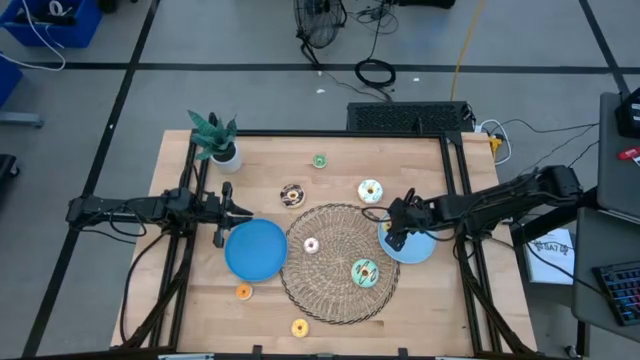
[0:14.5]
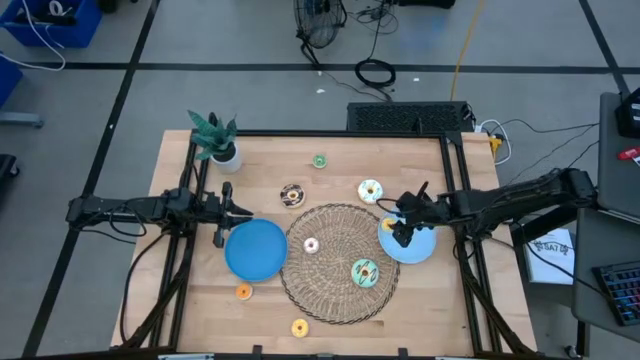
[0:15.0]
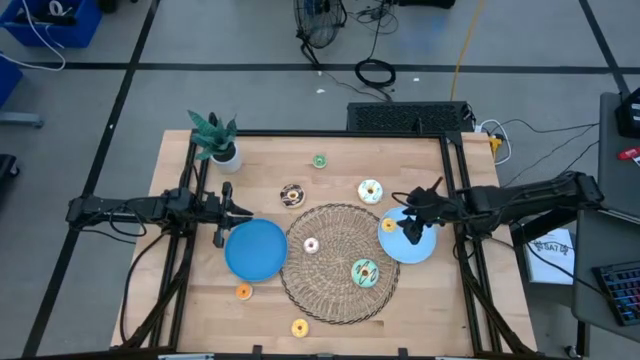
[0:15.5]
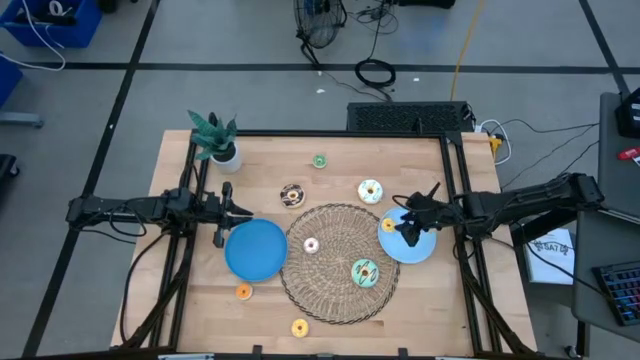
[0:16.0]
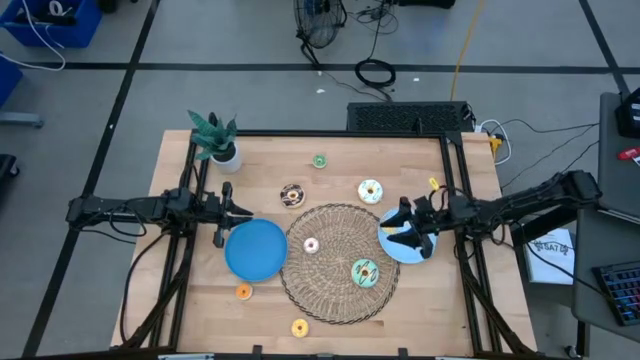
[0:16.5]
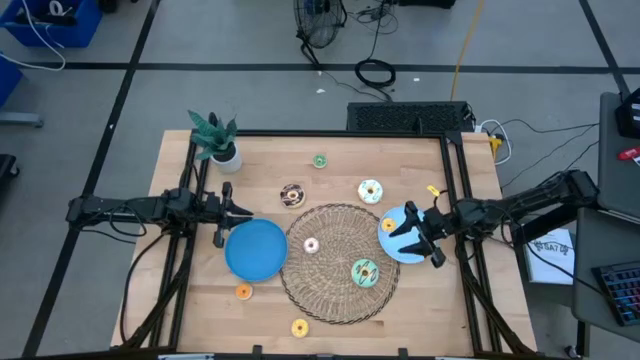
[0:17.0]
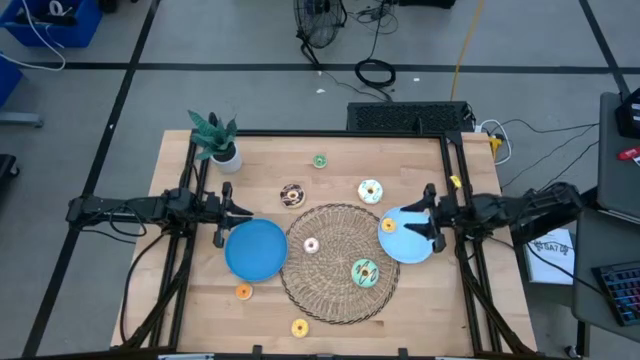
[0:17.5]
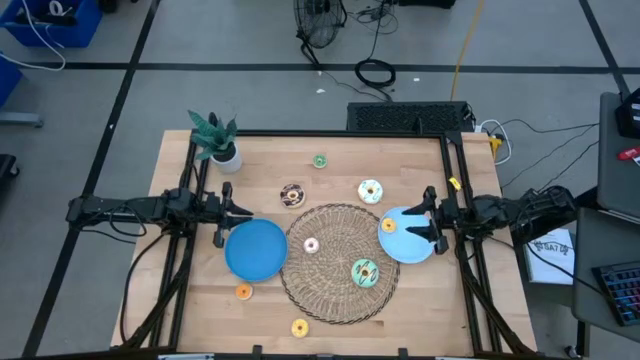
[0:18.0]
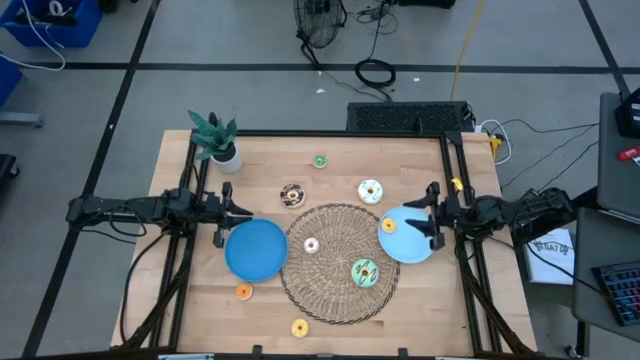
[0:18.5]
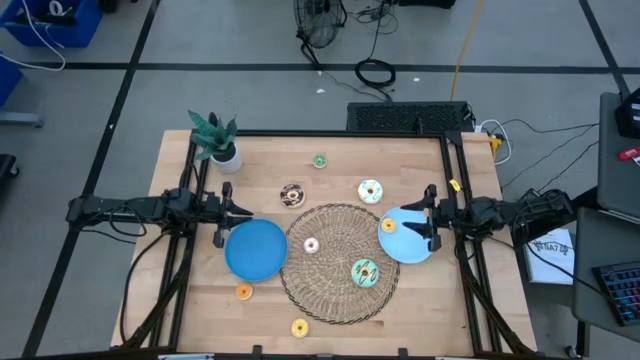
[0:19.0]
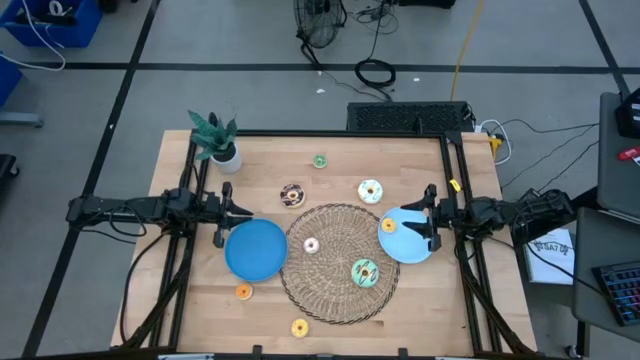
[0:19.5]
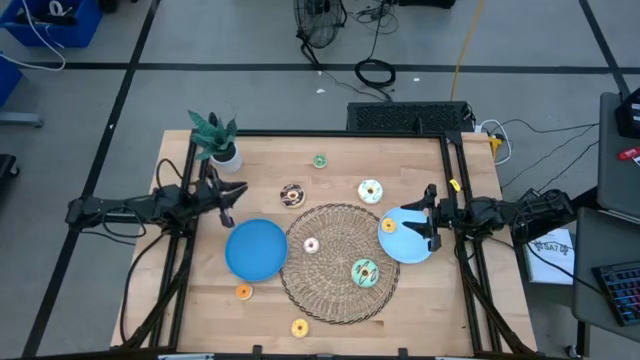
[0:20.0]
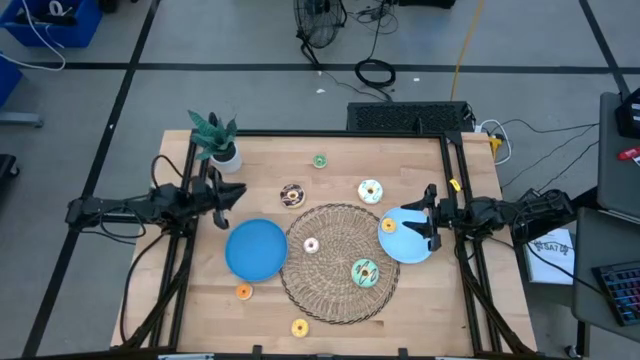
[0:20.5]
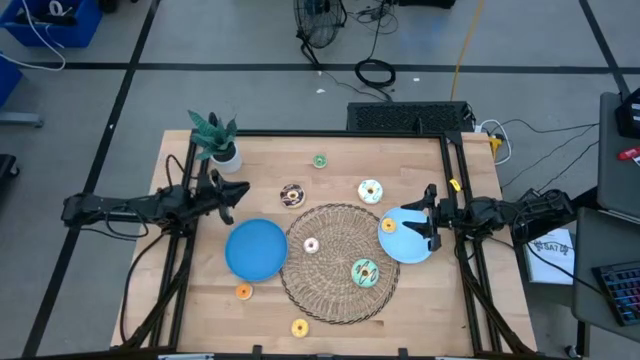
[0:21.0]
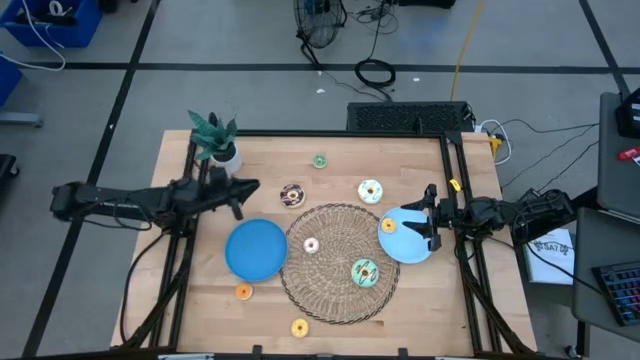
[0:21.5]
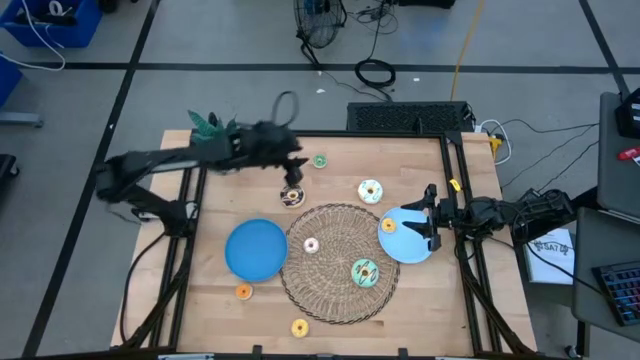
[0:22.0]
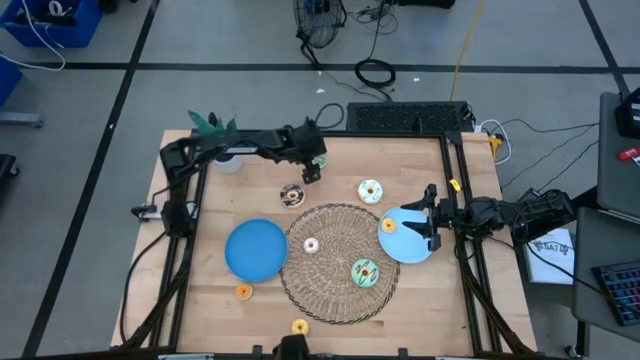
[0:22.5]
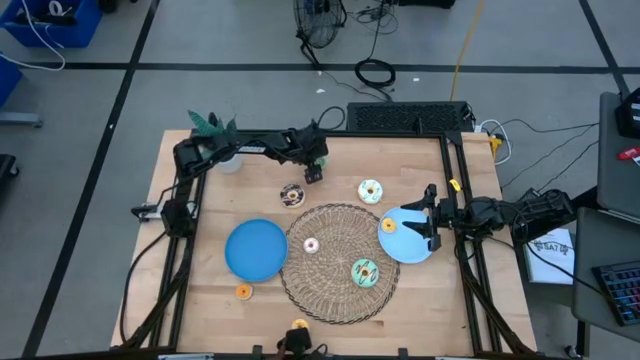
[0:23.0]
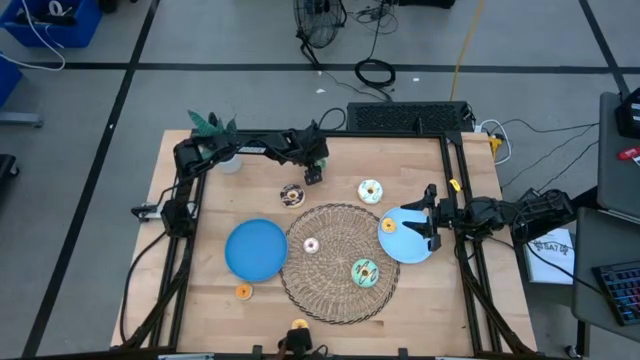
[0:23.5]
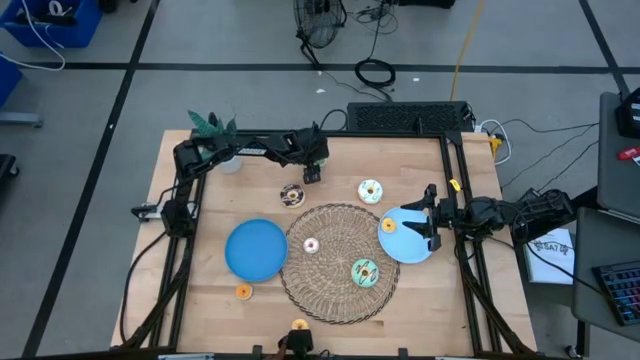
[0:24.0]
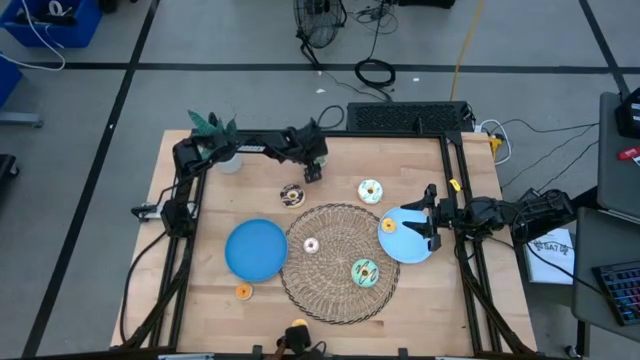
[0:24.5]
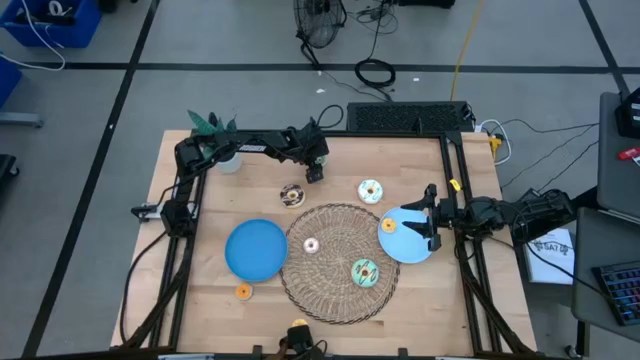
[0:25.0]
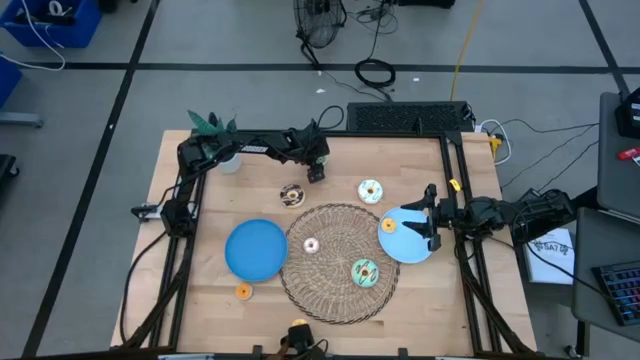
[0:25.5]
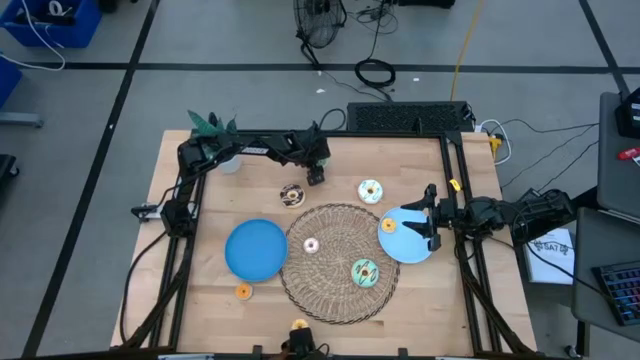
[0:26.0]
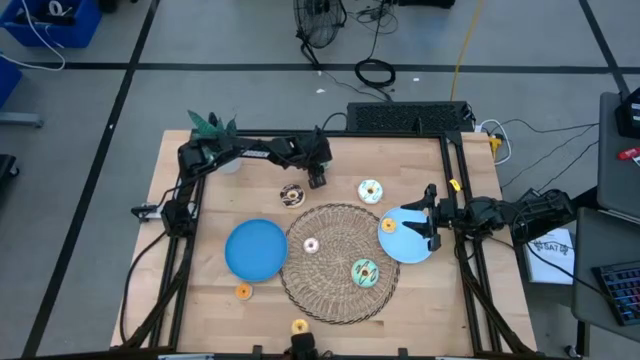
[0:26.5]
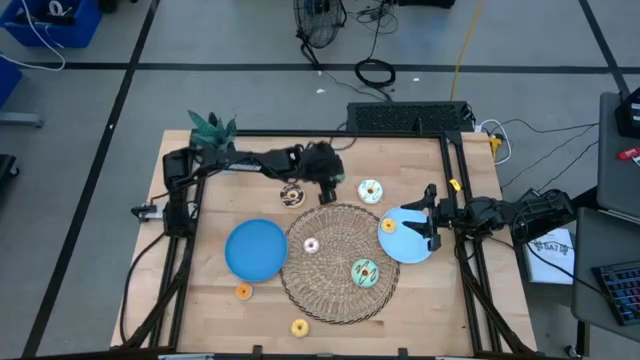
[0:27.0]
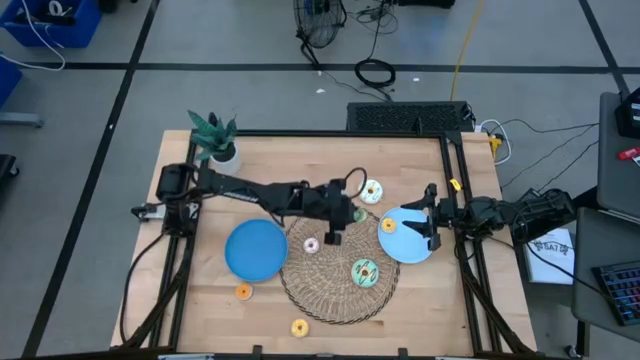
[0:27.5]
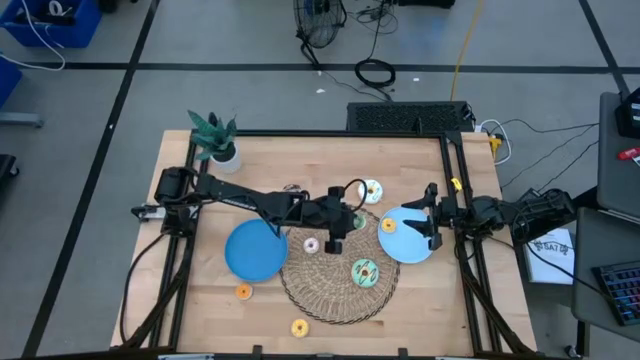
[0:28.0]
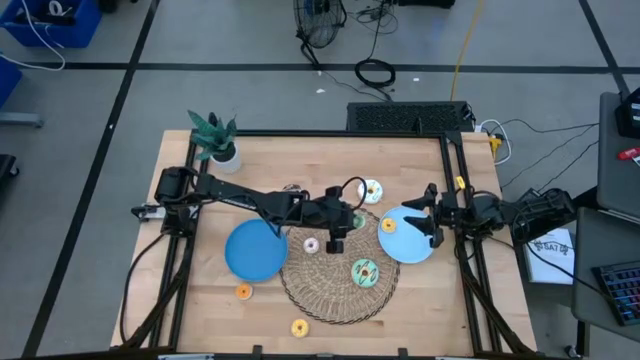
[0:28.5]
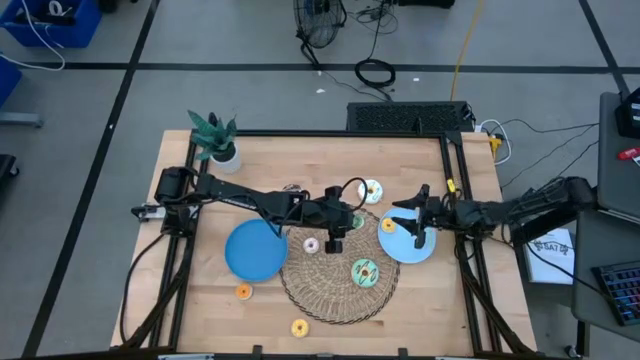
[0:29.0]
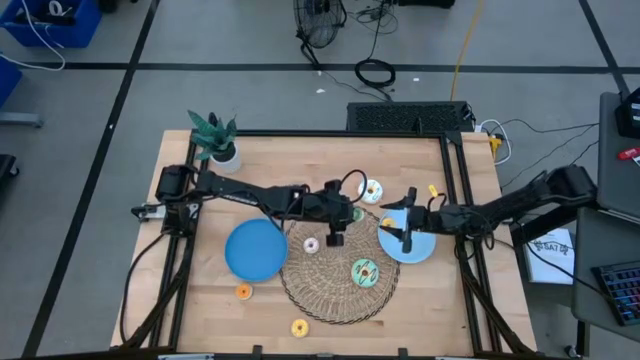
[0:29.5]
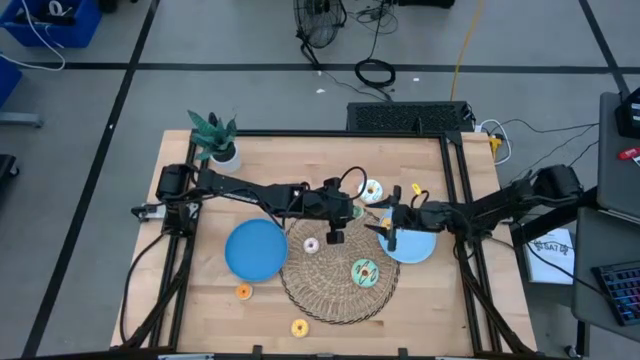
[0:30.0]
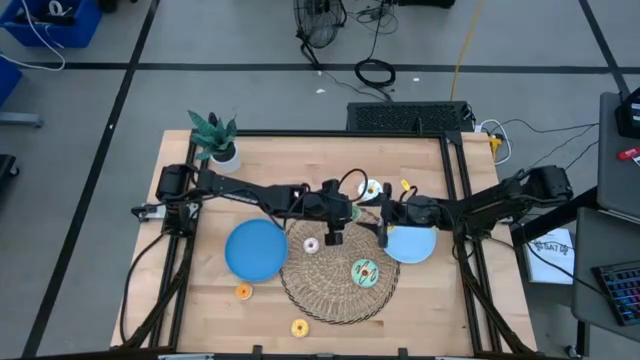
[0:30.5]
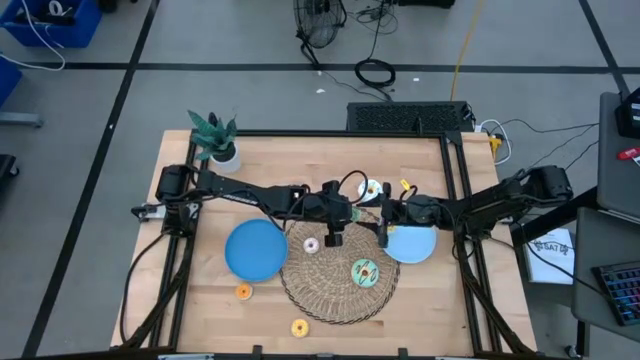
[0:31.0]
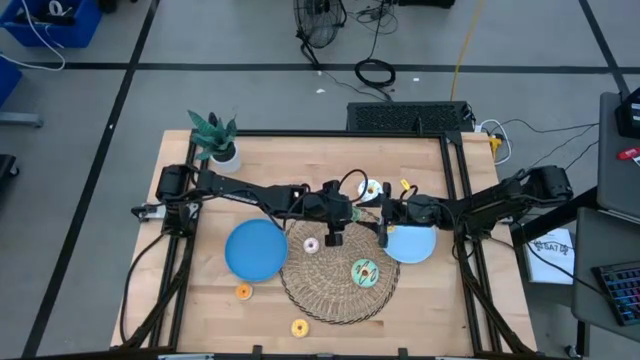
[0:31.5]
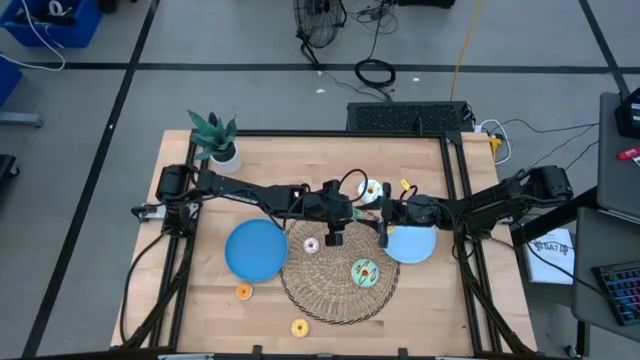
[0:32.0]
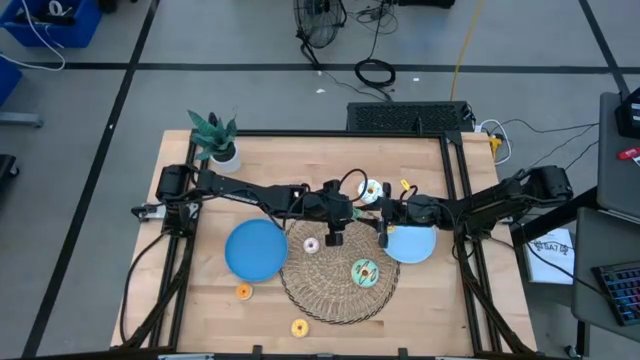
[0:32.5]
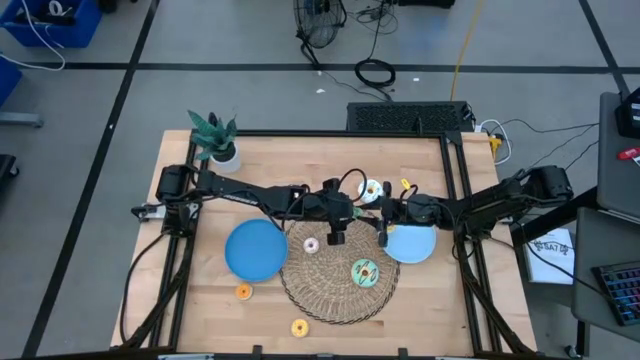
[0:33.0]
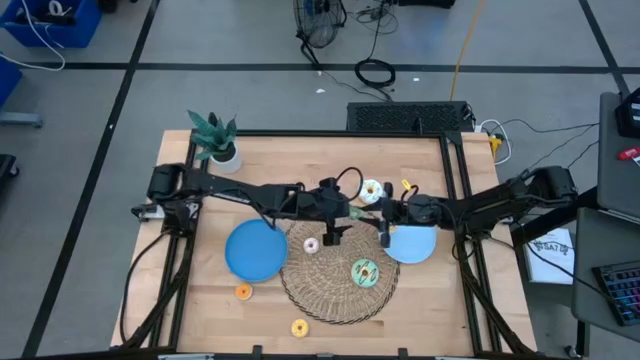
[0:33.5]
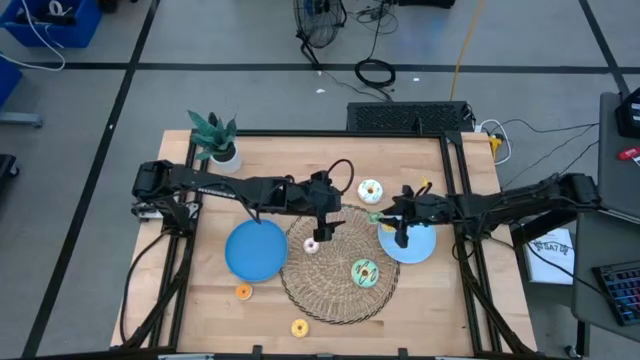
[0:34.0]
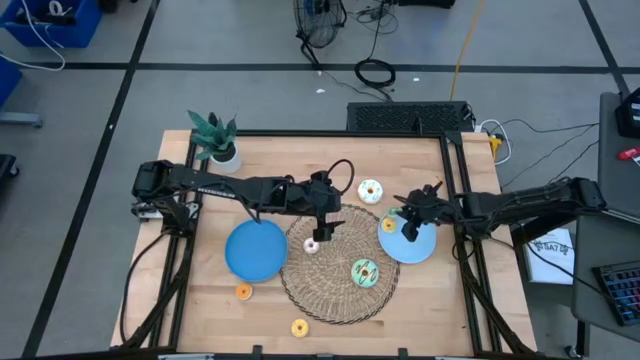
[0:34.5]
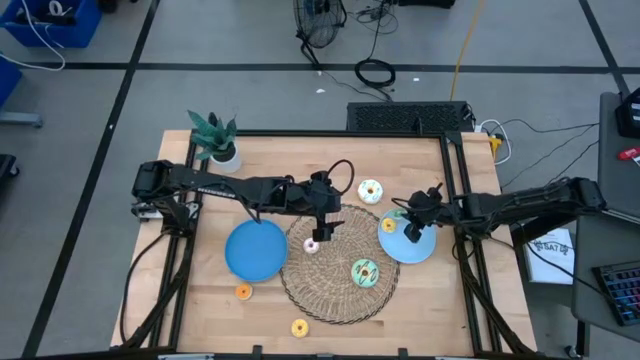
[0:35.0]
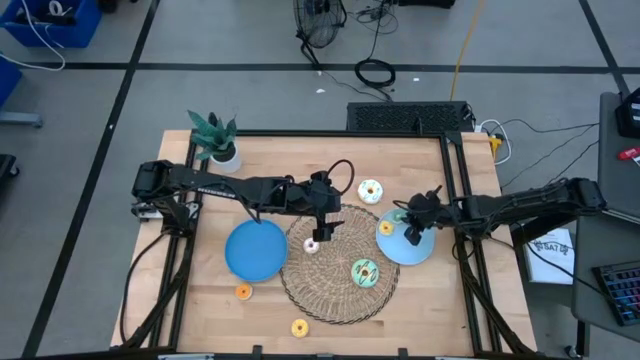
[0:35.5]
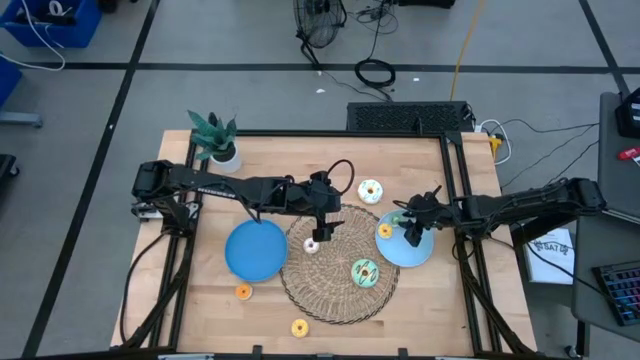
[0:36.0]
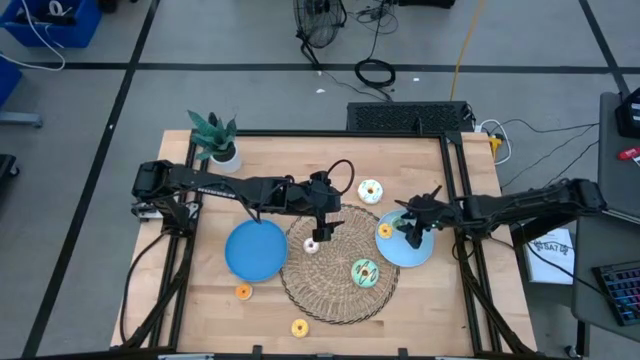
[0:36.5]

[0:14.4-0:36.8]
Task: Pick & Place donuts
Put the small green donut on the light blue plate
